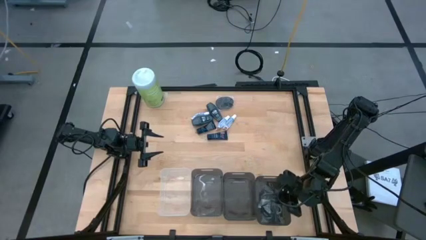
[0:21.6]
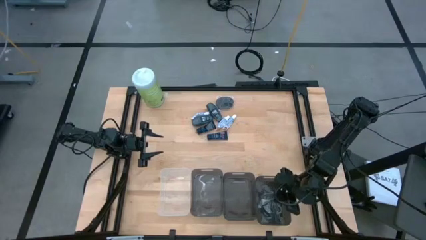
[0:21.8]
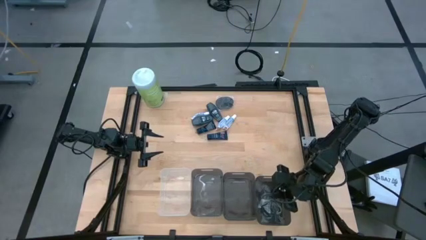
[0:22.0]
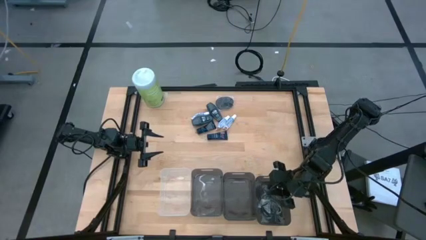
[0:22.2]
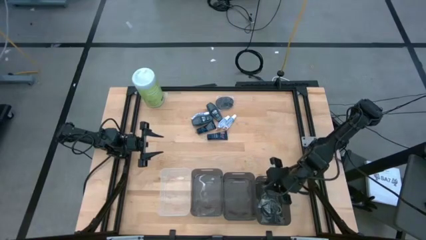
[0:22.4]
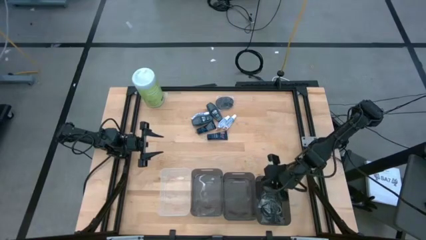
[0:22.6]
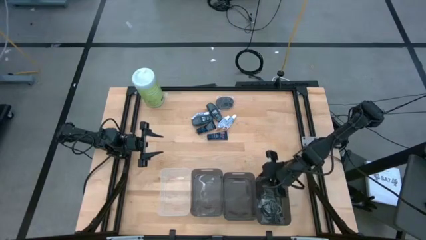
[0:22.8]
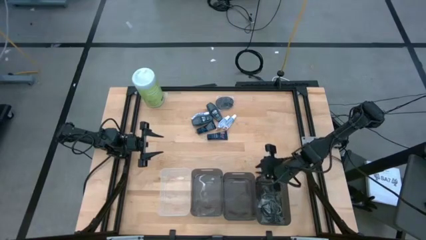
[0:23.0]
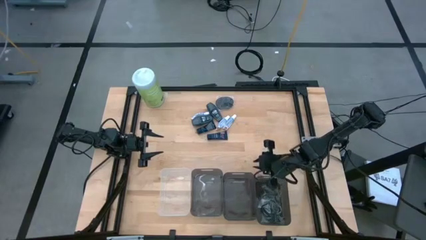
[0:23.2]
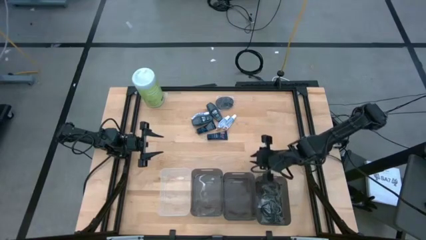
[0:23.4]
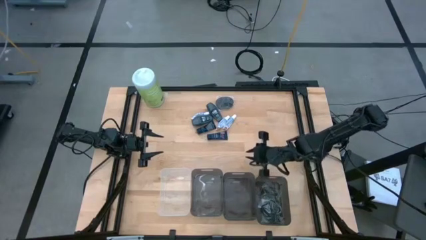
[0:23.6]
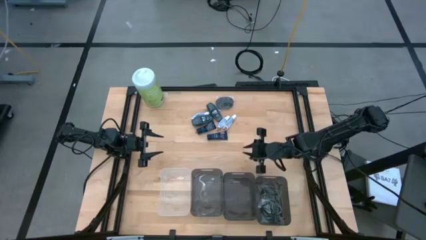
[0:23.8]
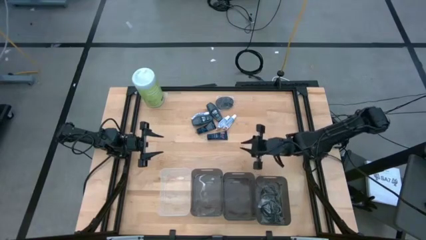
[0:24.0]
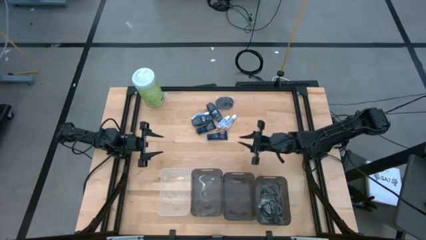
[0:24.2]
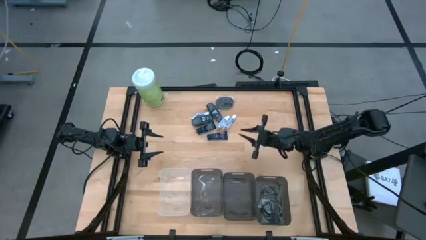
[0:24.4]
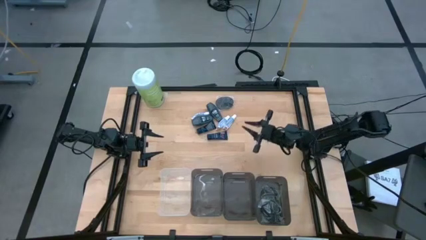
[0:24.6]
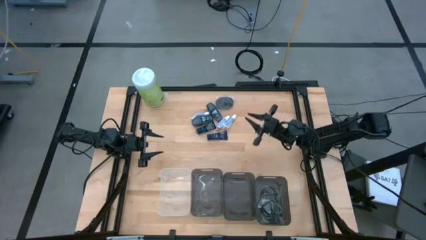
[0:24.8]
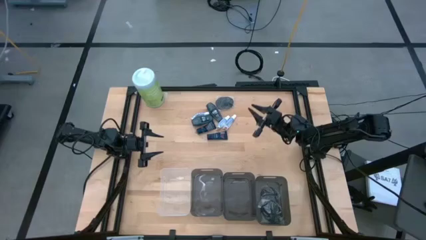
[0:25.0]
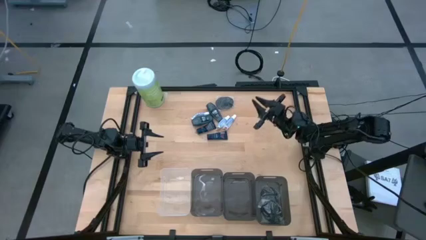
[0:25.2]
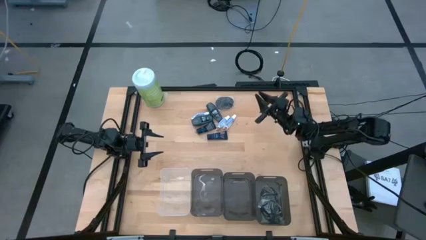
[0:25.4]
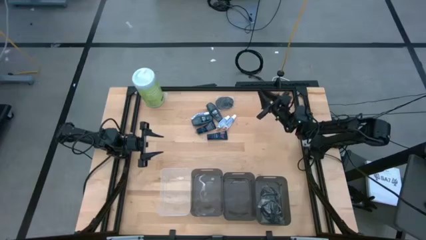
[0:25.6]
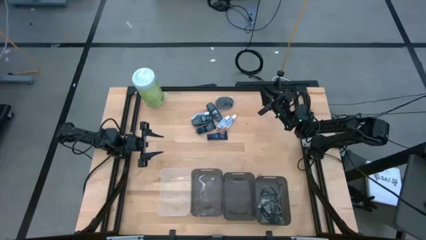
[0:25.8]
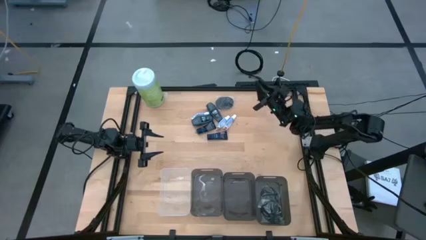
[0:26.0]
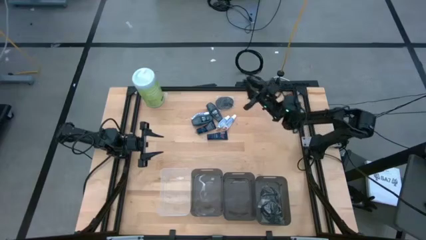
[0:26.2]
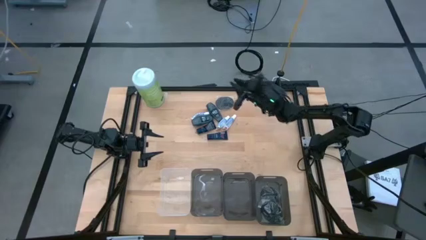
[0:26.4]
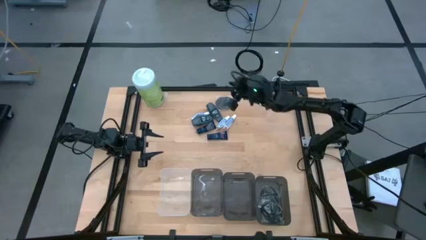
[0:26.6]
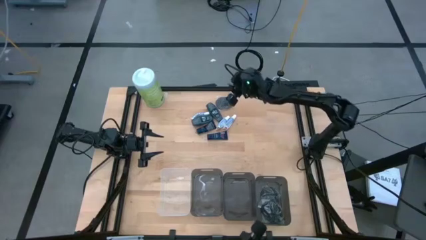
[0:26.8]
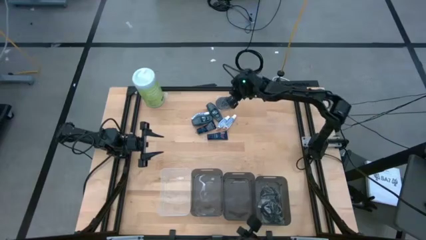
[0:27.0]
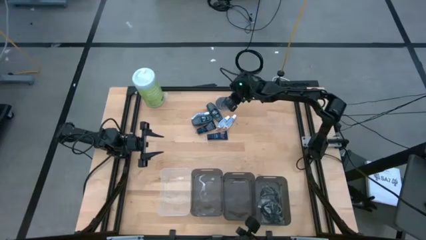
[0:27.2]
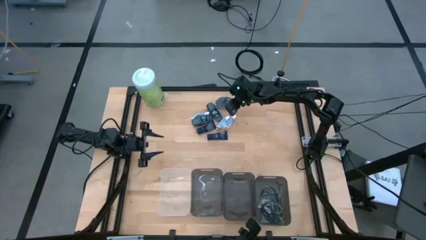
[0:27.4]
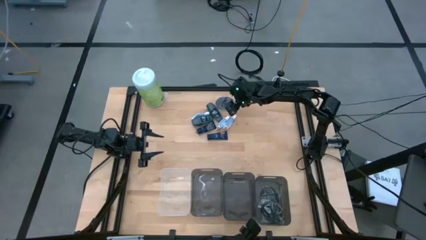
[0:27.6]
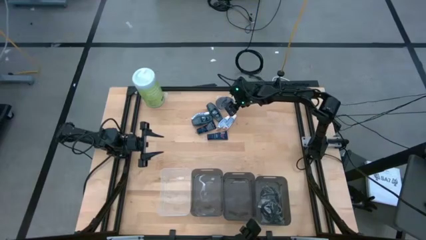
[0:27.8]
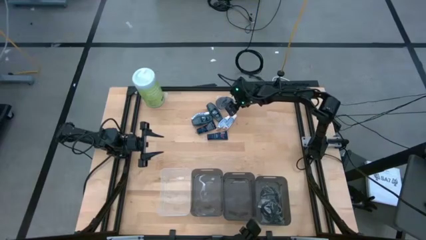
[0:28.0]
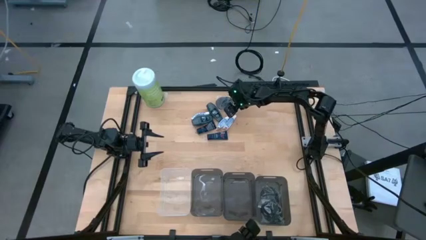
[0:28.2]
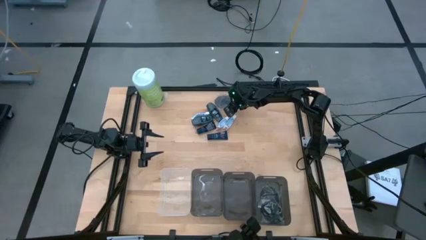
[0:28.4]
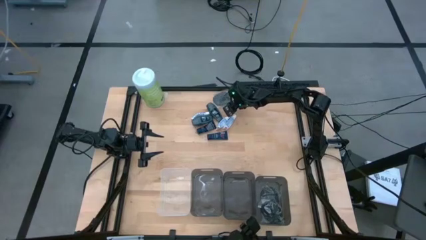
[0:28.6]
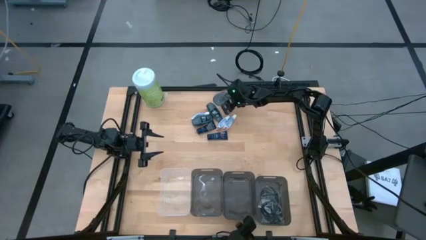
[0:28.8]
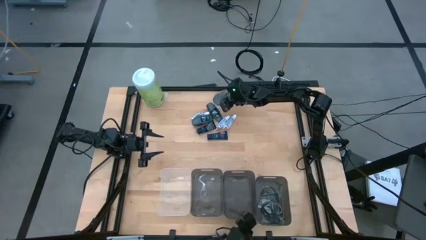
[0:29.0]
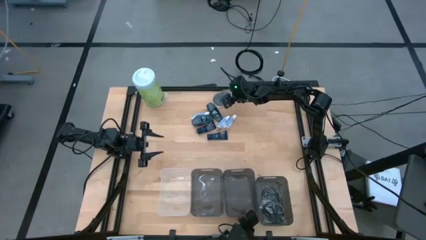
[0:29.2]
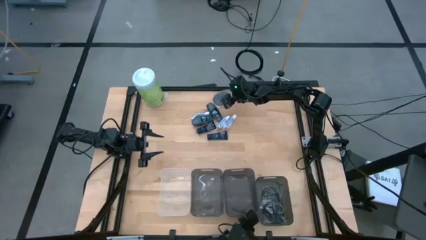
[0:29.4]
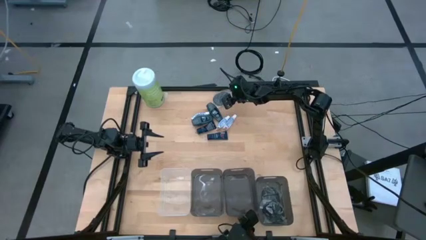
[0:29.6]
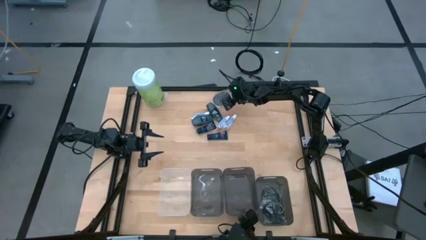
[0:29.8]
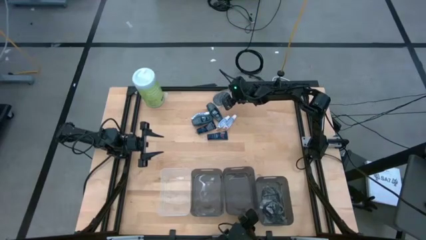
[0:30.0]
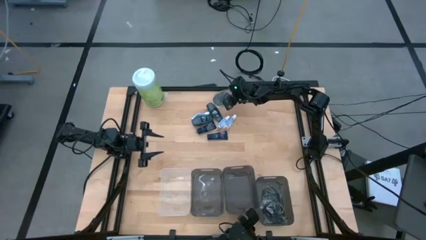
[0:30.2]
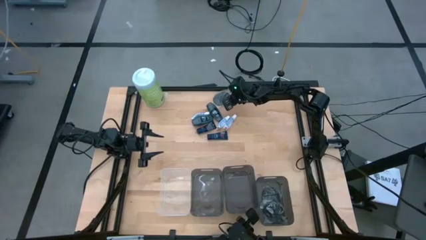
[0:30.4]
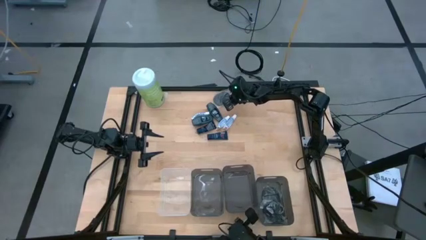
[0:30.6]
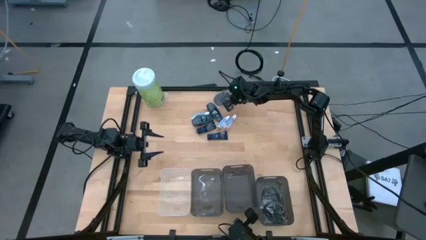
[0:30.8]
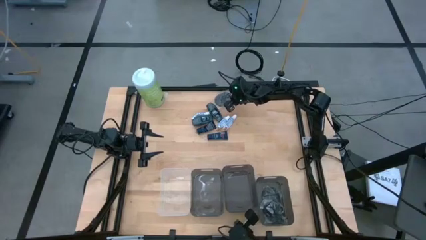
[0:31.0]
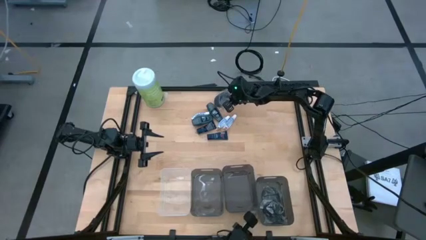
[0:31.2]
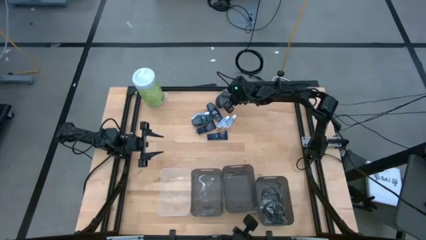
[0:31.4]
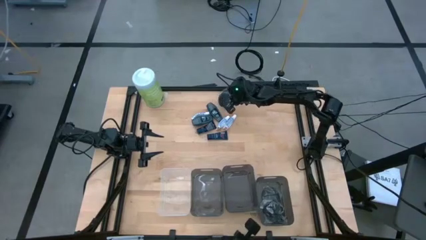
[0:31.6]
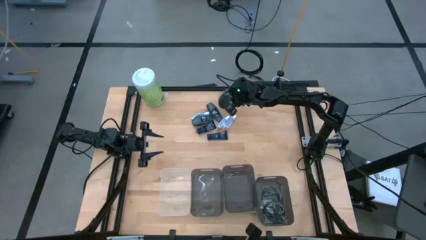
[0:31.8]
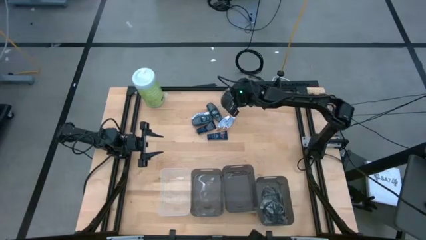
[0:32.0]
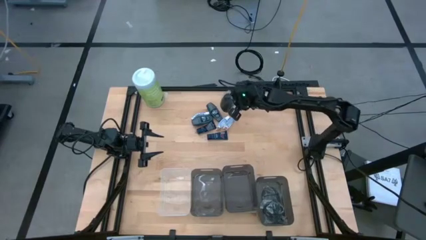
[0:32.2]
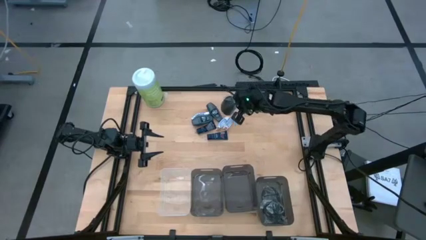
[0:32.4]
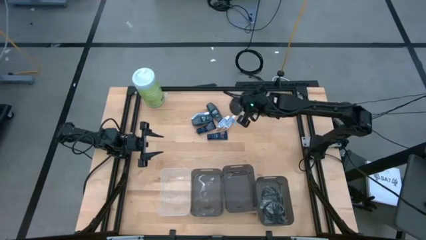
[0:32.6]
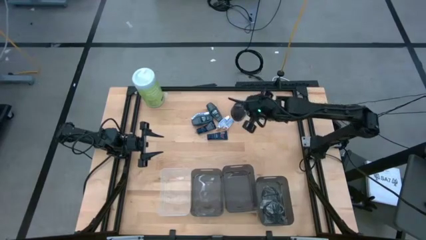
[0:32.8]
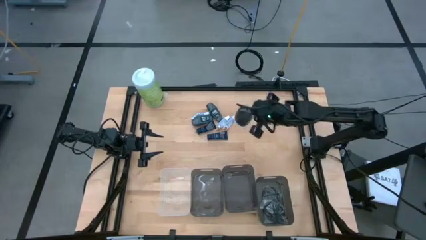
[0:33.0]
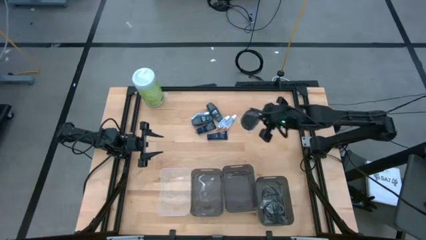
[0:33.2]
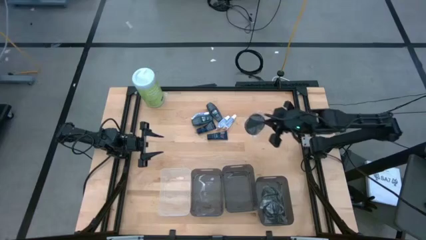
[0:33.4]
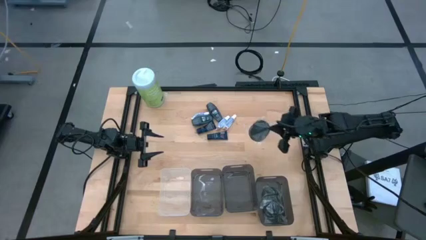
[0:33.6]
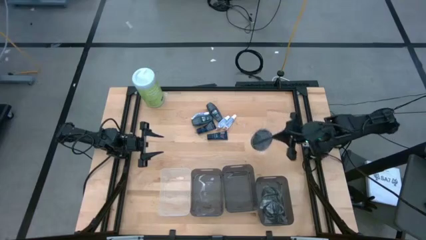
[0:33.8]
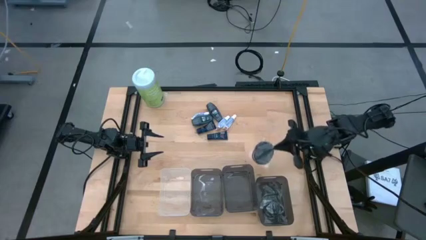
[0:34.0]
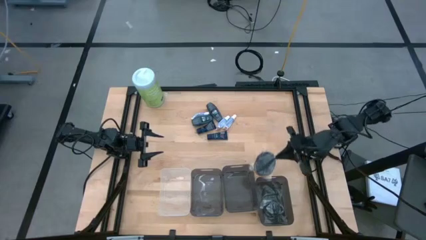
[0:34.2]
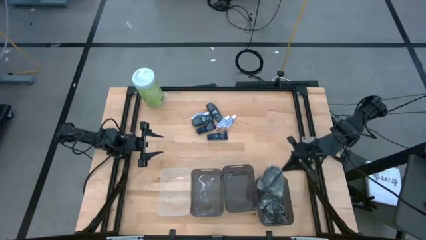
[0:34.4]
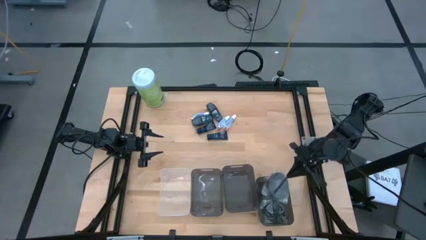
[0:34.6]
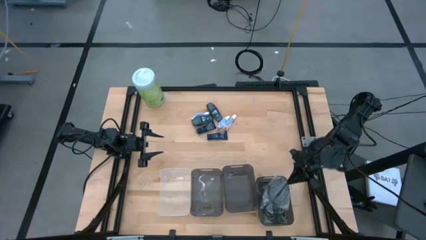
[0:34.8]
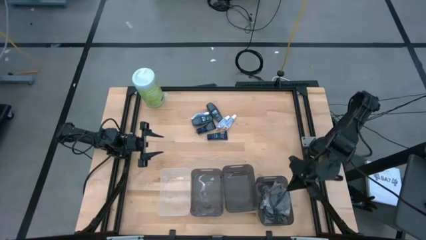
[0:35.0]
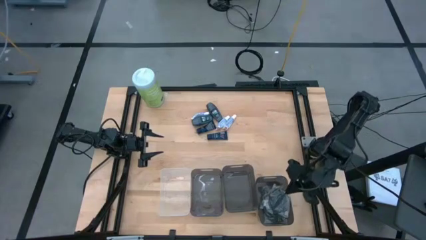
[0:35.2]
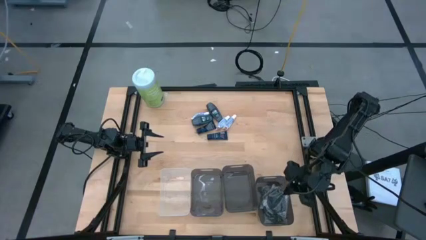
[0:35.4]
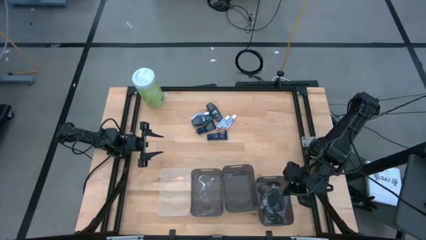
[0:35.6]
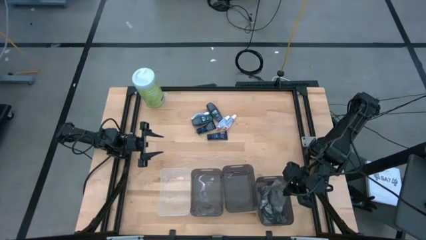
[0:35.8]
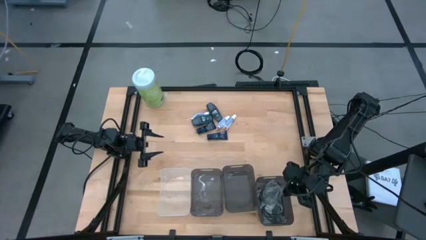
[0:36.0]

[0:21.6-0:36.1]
Task: Pick & Place Travel size toiletries
Put the black hairbrush into the right black bin

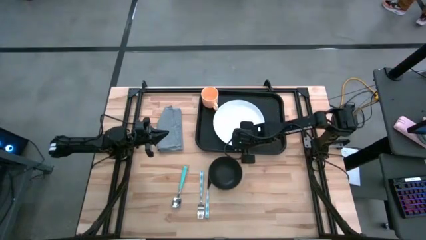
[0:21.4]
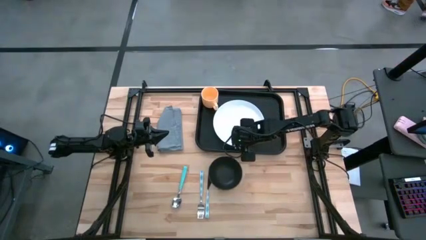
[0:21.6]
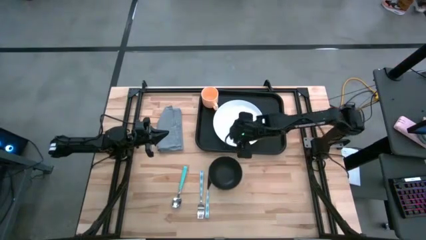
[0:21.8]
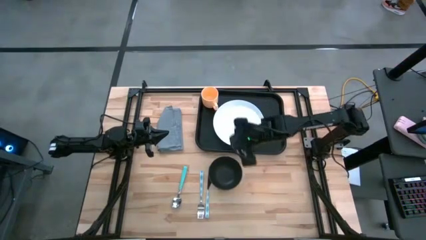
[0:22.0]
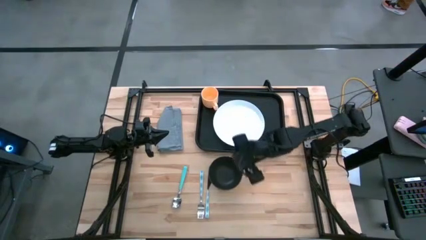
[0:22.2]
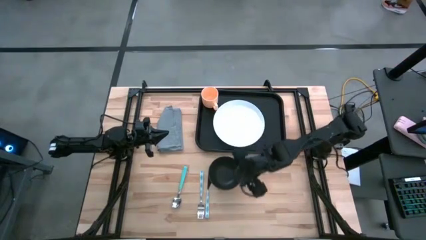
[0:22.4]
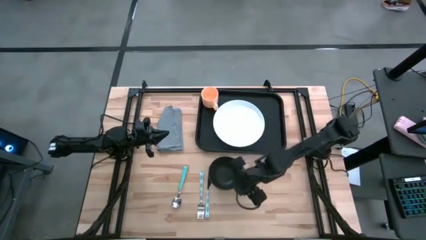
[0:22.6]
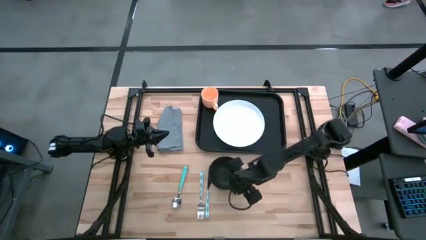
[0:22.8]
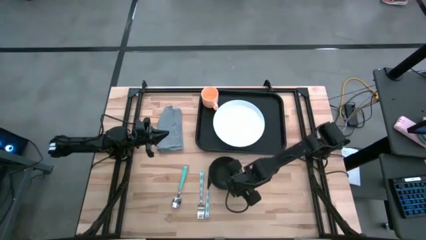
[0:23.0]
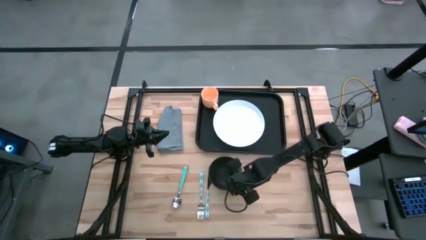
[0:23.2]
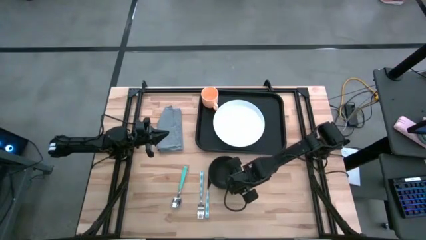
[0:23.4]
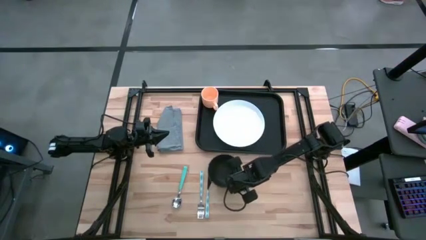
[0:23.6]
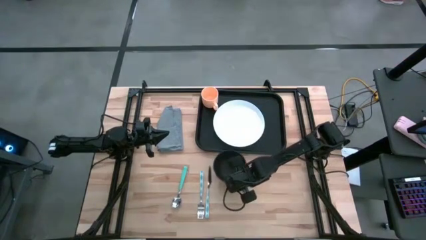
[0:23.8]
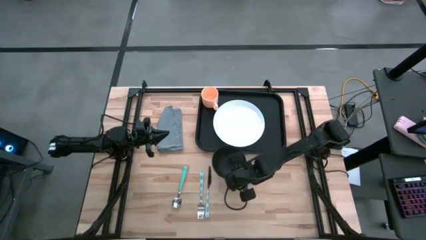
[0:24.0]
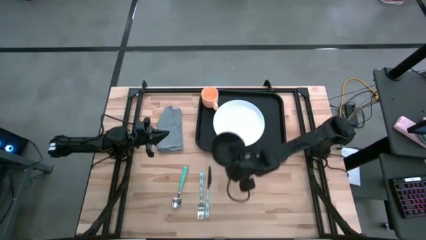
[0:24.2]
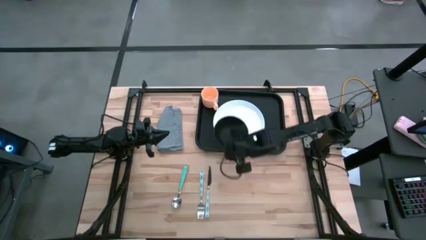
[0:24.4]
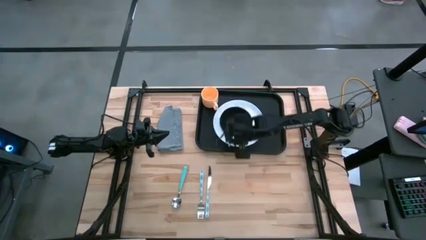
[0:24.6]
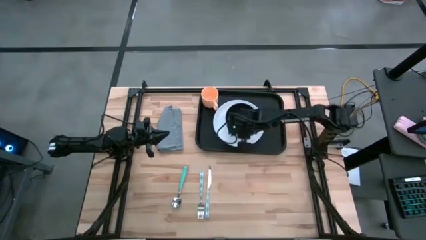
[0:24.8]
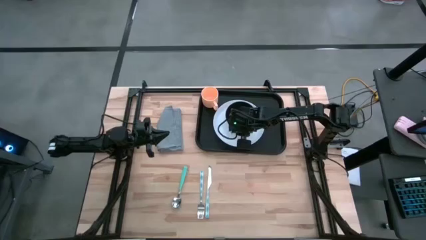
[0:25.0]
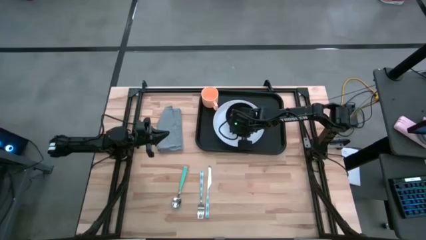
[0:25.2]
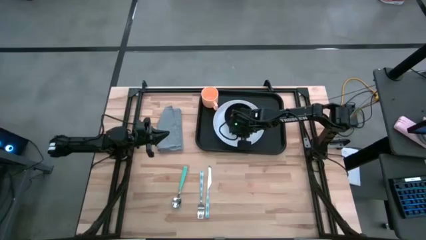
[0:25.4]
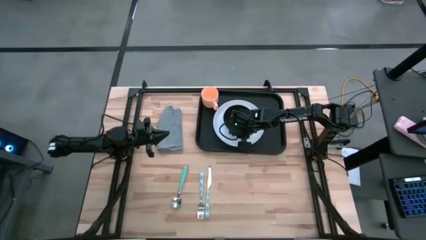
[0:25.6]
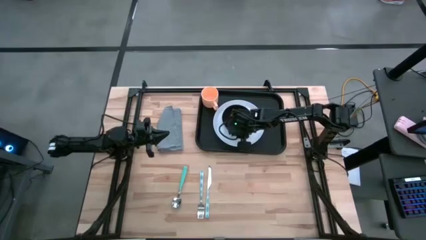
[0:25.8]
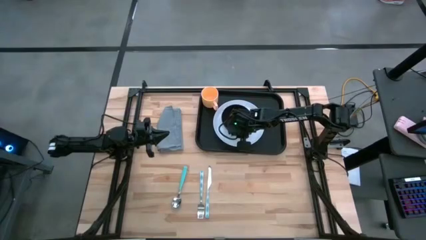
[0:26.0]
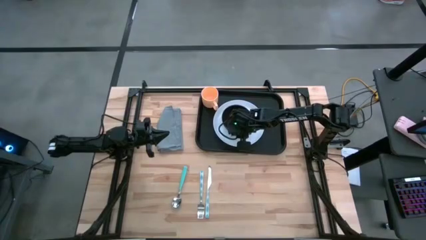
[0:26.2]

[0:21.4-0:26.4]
Task: Set up tray
Put the black bowl on the white plate on the black tray
